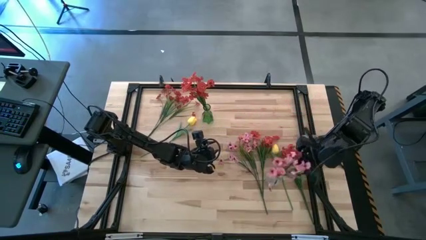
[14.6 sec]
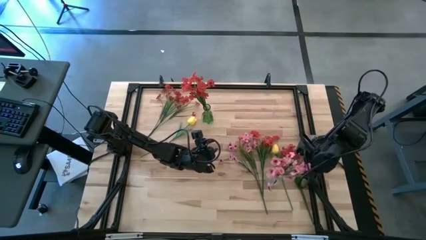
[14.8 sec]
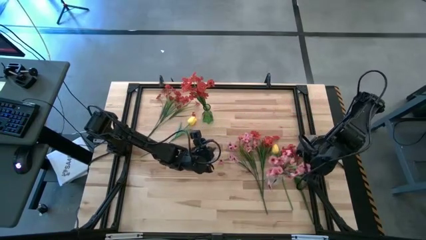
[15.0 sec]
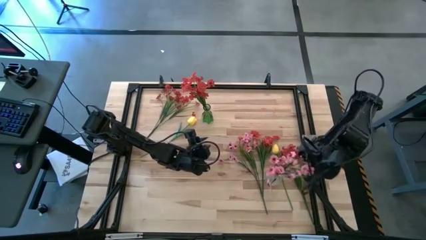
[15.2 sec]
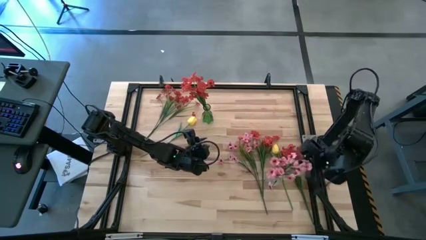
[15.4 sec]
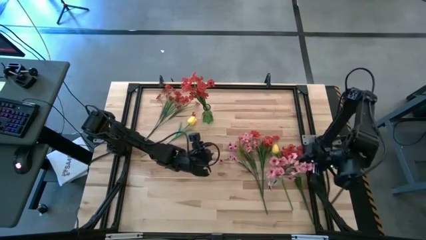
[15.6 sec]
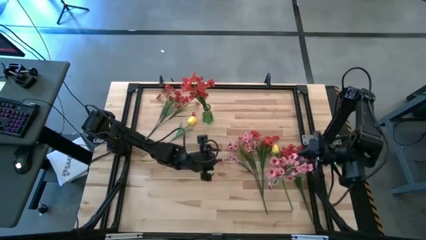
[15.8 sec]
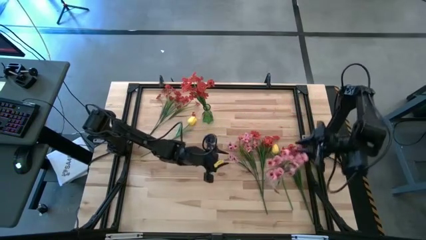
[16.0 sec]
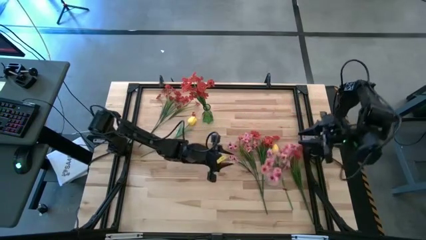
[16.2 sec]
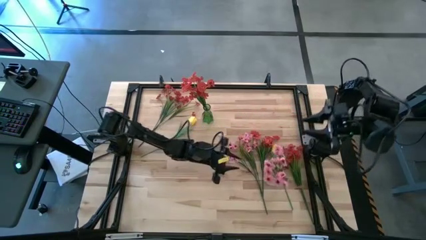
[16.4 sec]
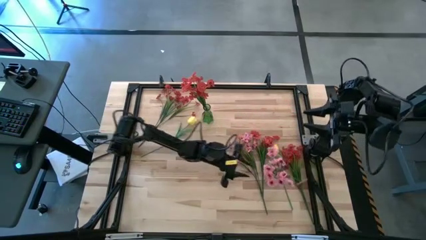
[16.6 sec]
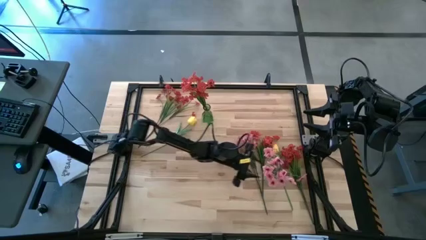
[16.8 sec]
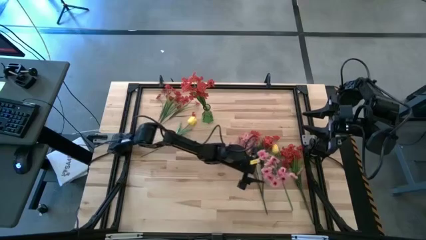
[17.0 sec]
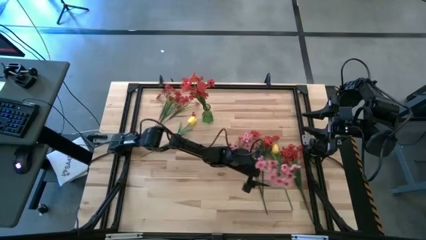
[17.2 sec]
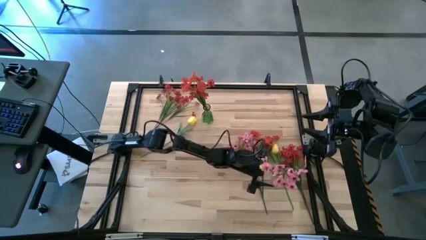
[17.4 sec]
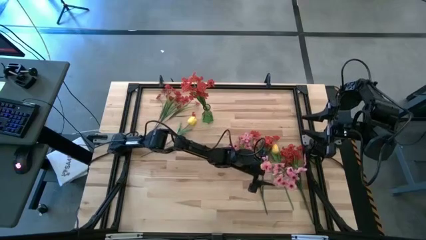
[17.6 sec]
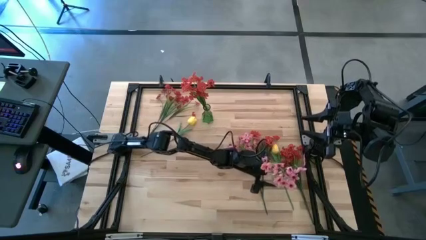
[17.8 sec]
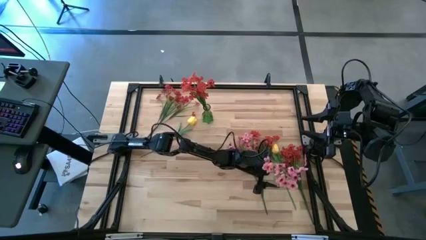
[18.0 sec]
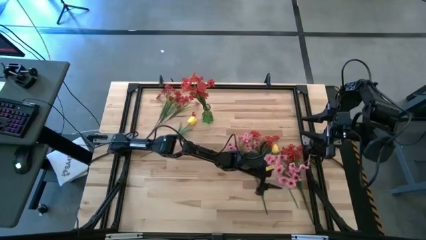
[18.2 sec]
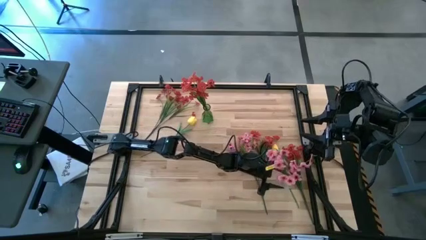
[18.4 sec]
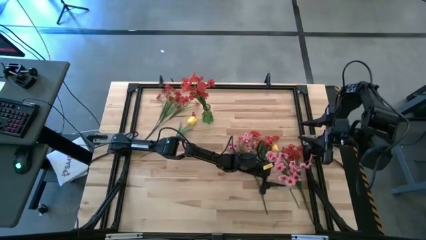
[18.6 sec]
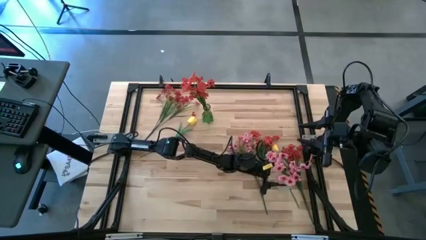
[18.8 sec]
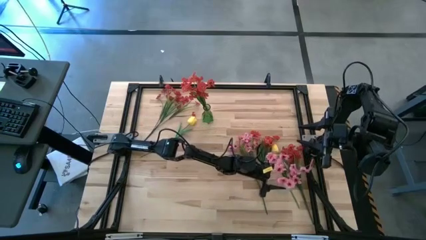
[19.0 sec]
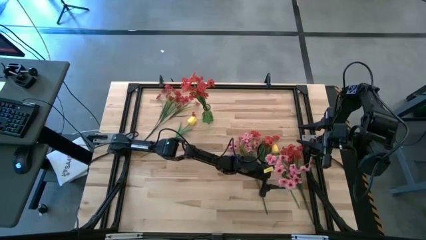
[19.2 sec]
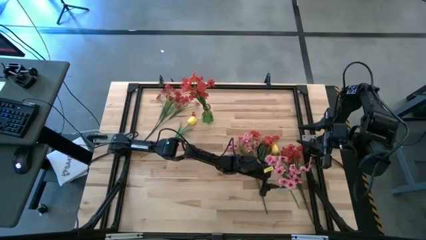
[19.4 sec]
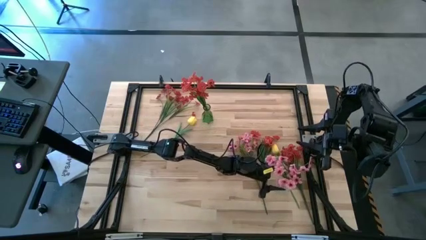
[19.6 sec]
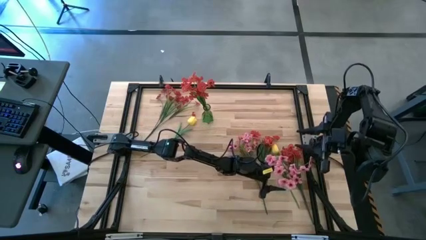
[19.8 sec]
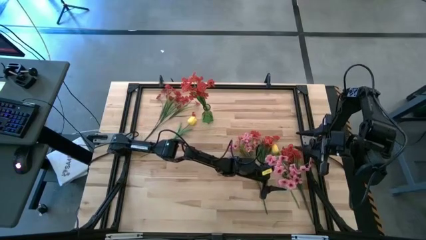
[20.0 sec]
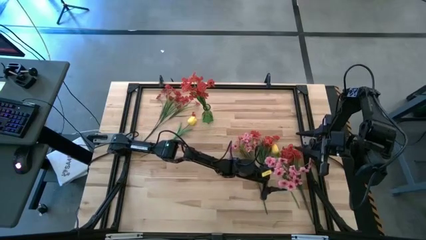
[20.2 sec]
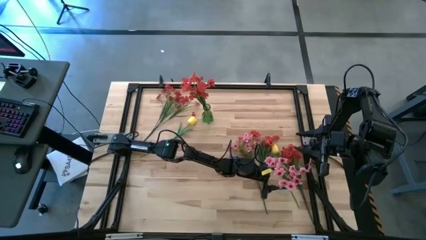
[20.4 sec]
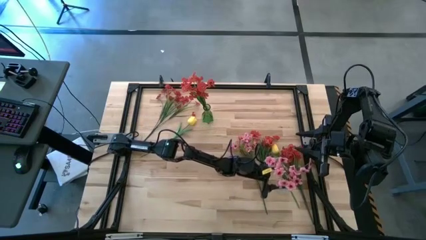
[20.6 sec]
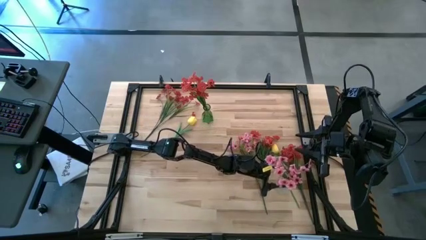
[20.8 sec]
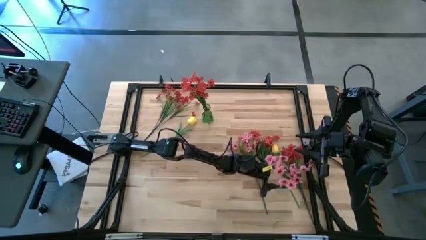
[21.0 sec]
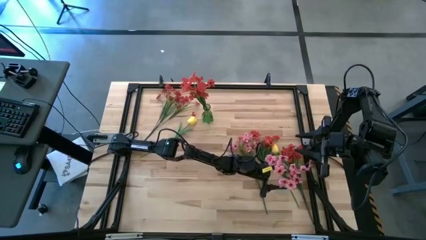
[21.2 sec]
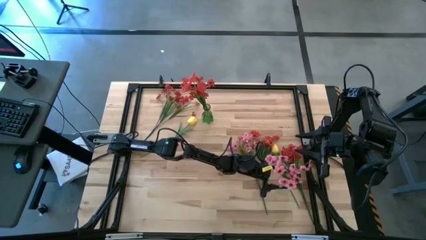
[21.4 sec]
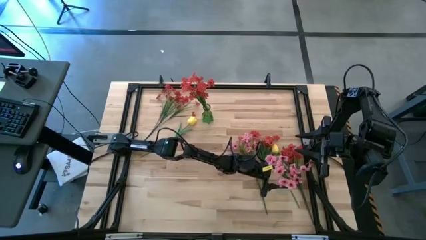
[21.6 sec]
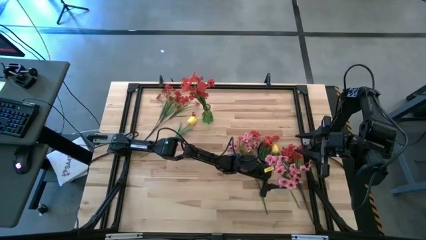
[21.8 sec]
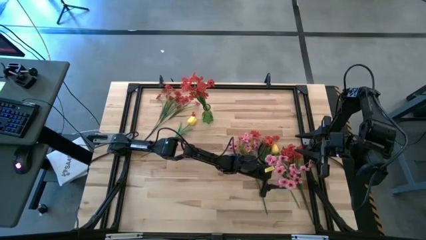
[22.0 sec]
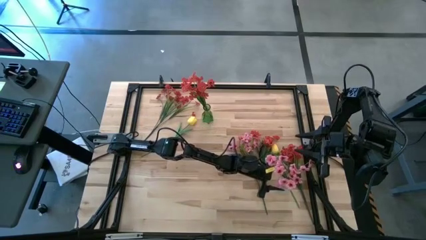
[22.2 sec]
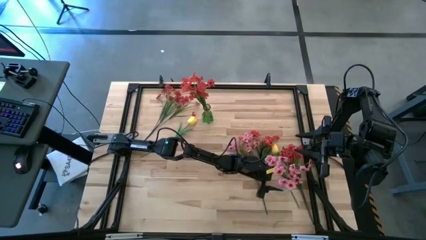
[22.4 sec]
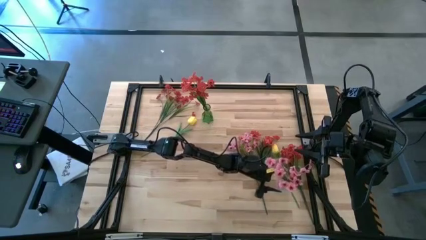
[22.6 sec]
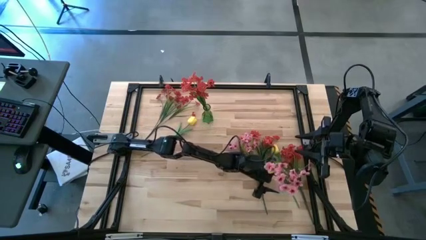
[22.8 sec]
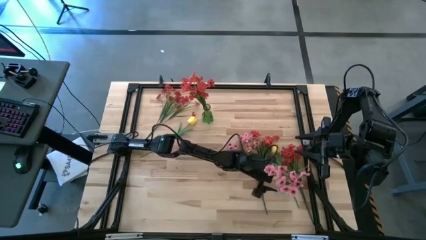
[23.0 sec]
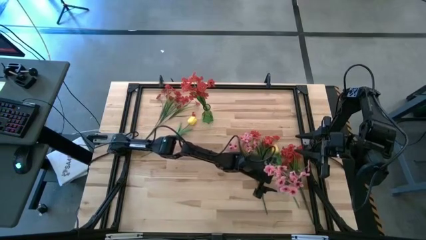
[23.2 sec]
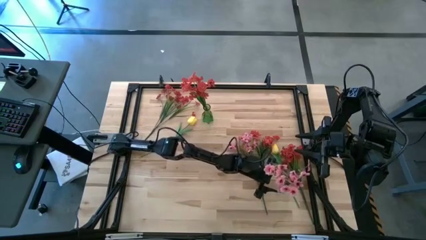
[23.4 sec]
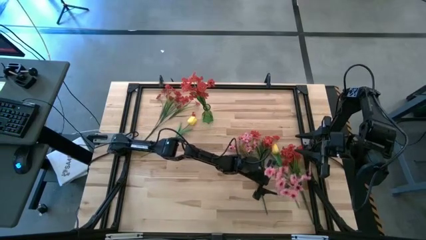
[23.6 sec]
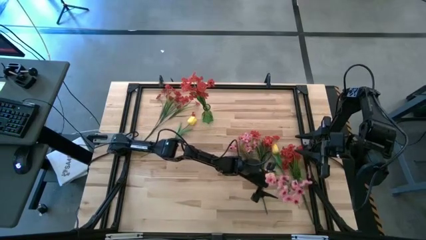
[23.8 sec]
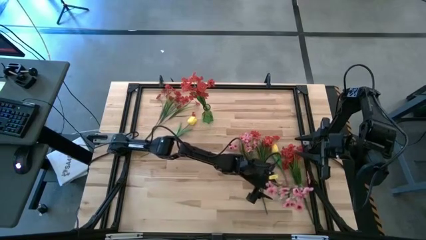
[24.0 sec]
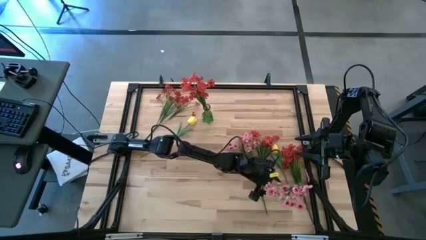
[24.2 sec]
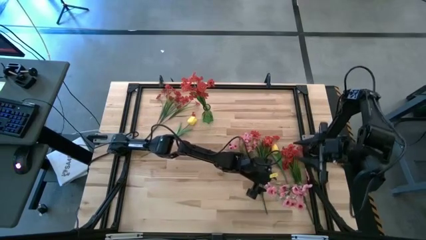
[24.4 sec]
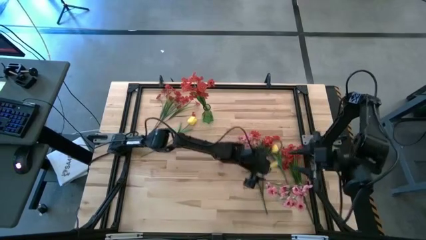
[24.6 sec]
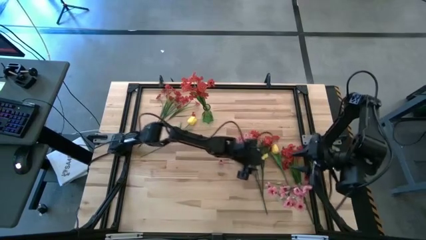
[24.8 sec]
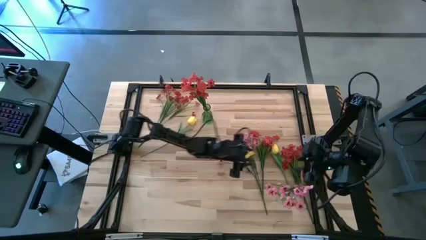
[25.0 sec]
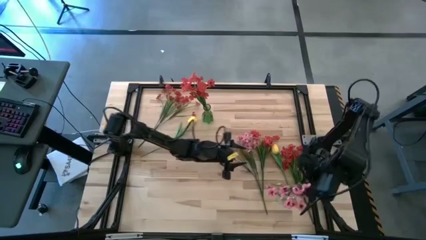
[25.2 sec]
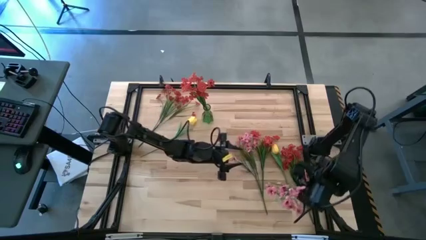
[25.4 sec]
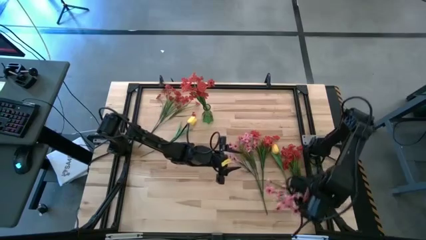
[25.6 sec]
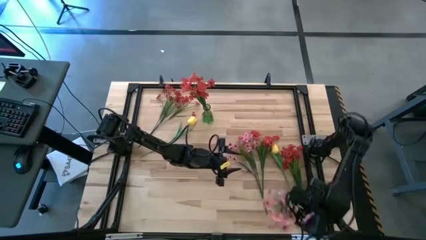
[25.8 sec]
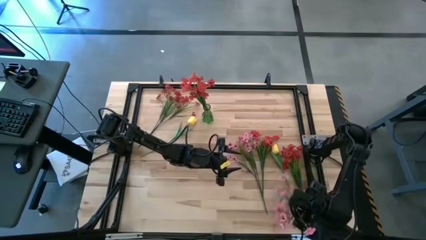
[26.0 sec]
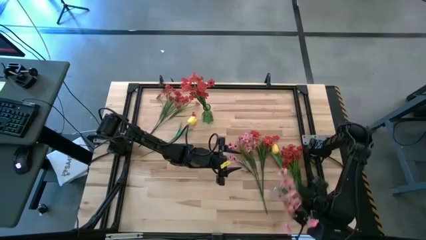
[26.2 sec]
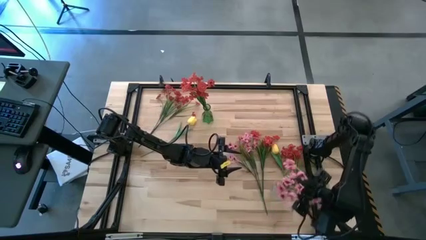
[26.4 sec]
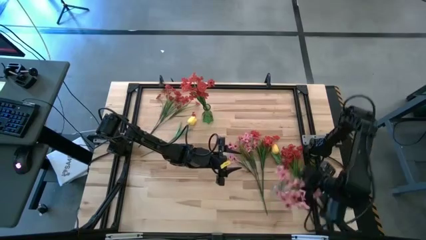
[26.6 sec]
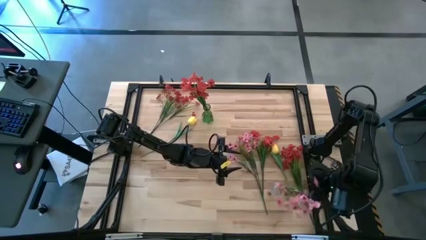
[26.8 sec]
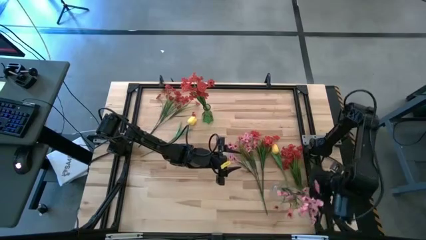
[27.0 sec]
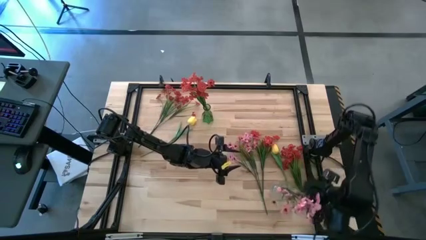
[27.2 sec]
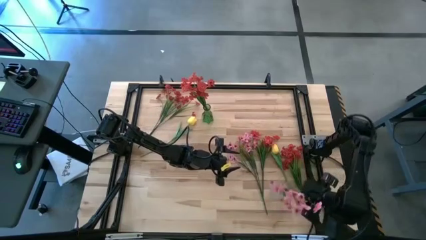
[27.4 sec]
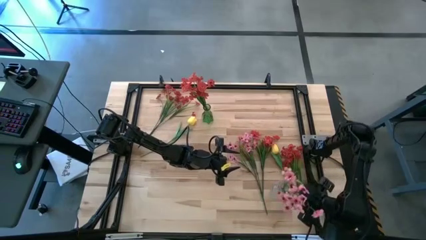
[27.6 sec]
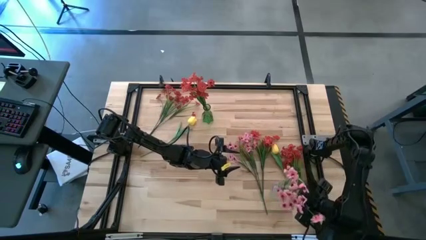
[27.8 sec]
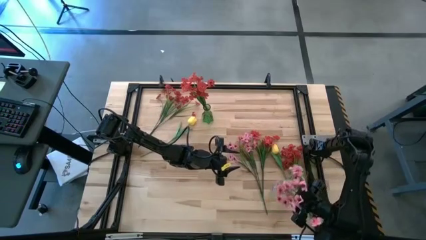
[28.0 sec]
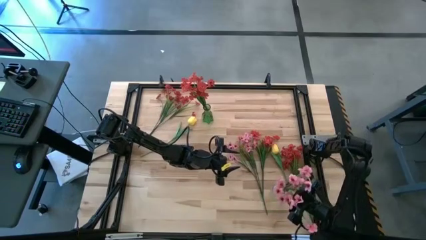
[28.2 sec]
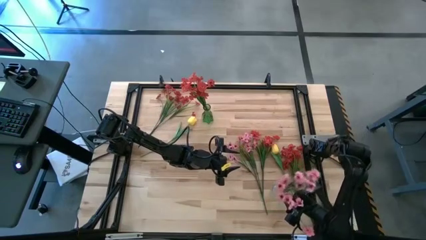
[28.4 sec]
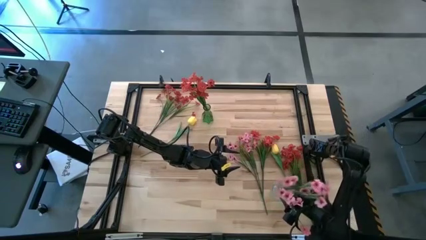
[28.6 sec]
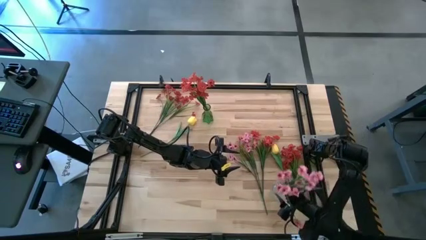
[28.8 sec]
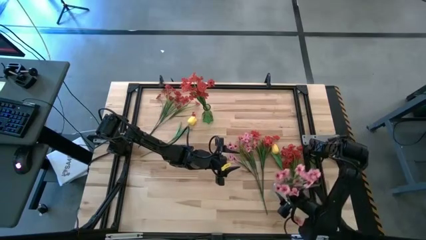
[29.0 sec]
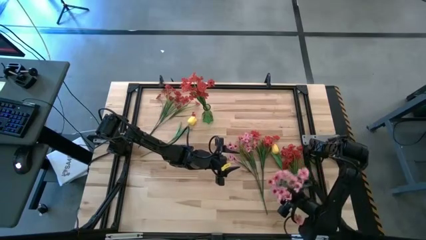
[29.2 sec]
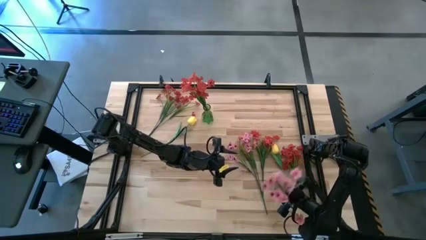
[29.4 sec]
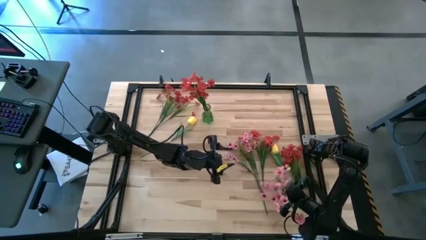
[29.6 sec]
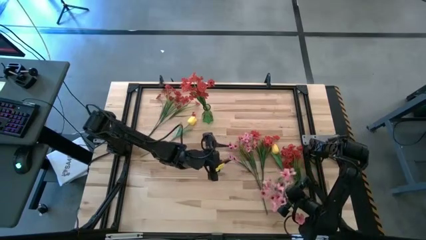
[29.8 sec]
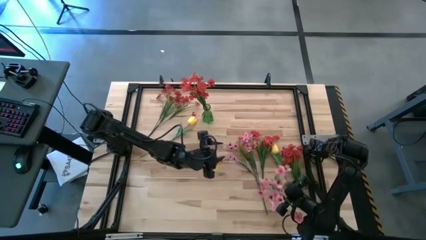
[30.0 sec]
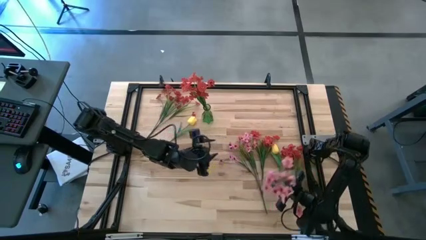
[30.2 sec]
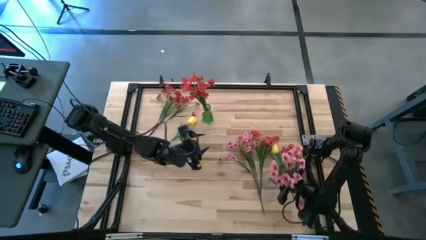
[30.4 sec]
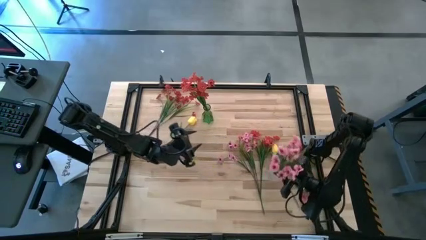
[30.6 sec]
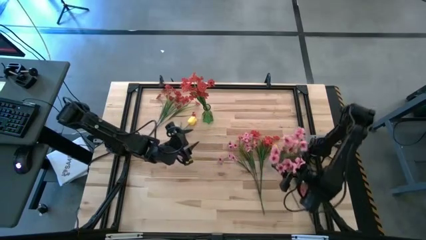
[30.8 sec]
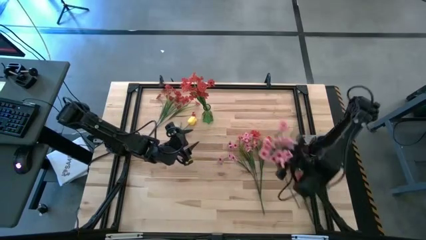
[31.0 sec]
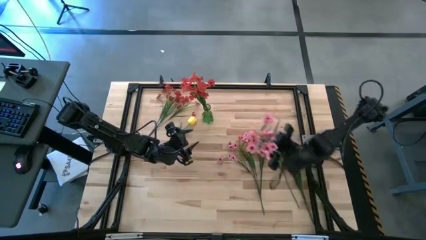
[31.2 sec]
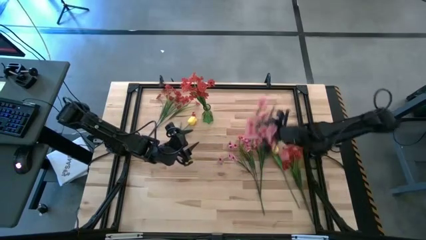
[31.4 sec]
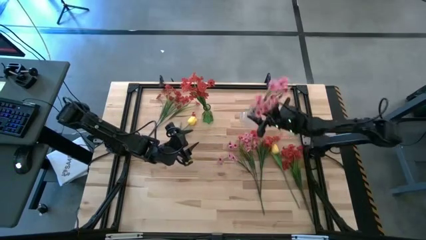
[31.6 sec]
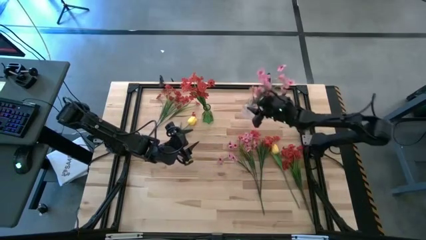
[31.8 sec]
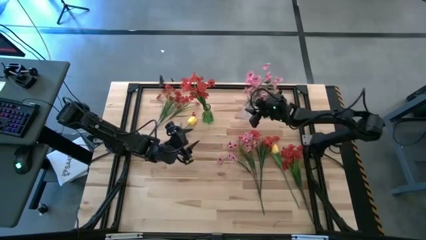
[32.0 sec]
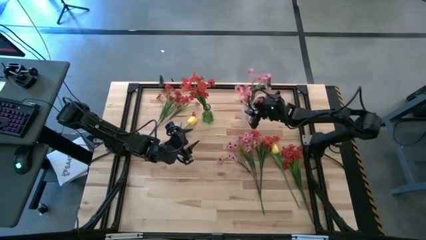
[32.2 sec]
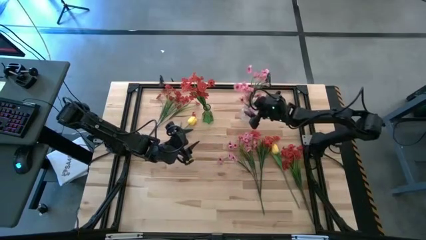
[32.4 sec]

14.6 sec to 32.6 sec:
Task: Sort flowers into vase by color
Move the transparent vase to the top of the table
